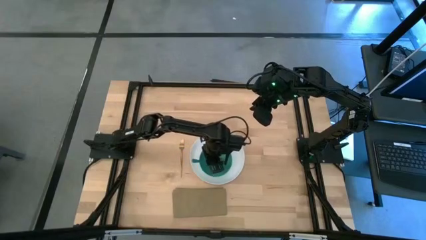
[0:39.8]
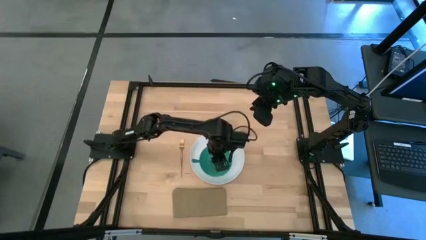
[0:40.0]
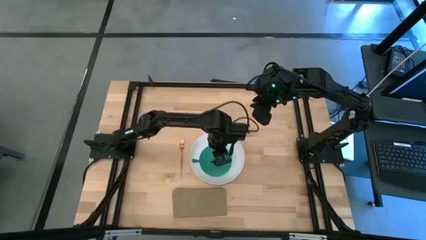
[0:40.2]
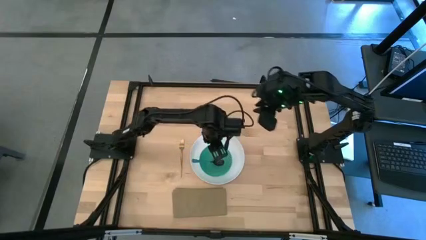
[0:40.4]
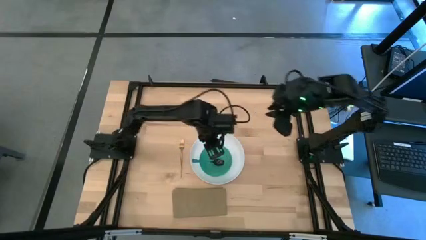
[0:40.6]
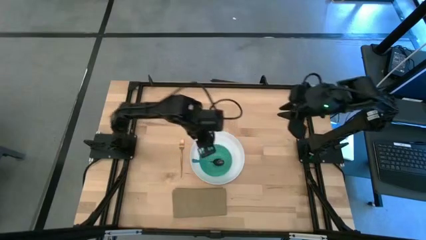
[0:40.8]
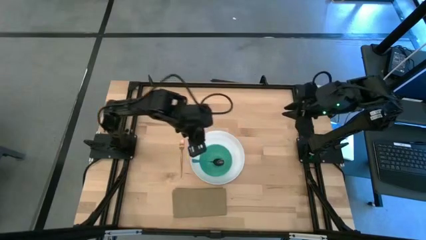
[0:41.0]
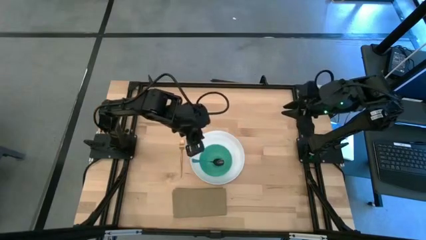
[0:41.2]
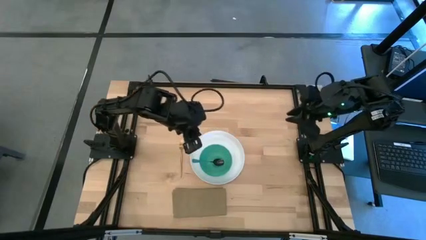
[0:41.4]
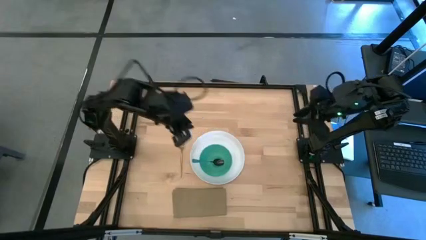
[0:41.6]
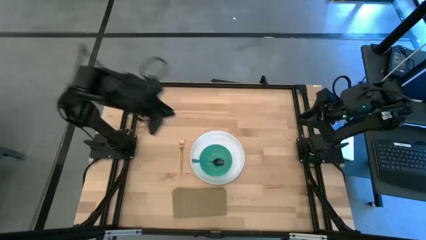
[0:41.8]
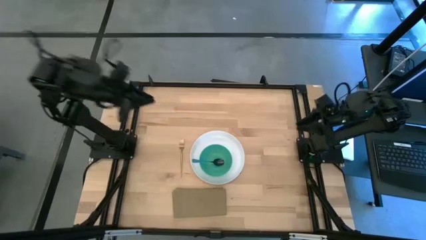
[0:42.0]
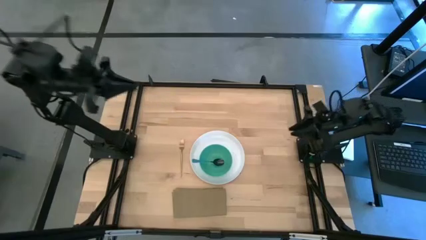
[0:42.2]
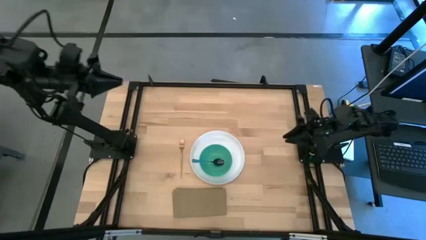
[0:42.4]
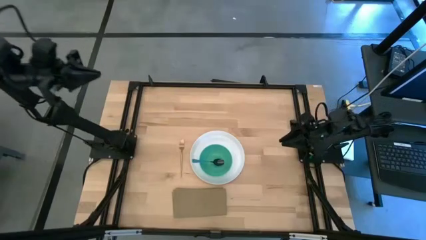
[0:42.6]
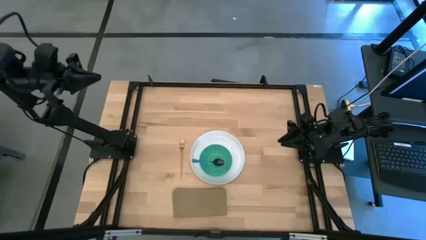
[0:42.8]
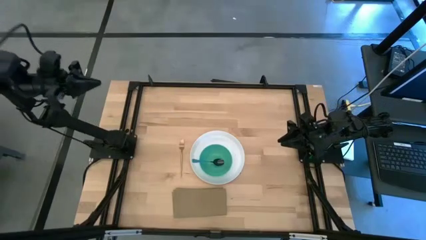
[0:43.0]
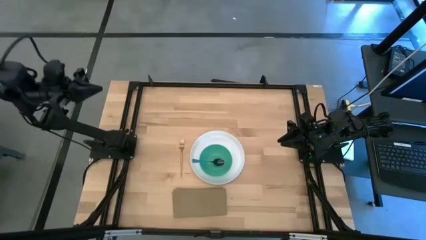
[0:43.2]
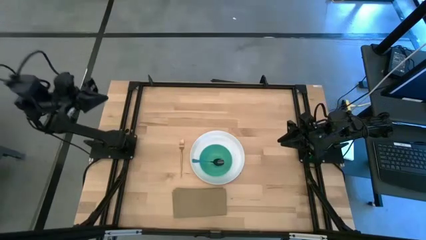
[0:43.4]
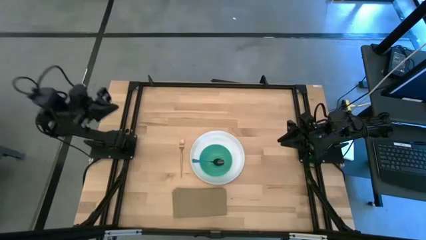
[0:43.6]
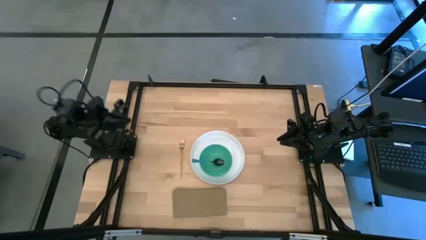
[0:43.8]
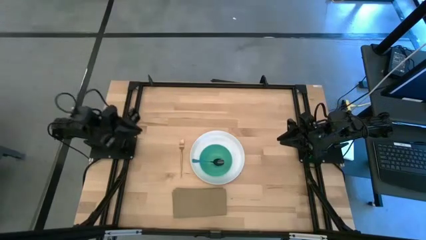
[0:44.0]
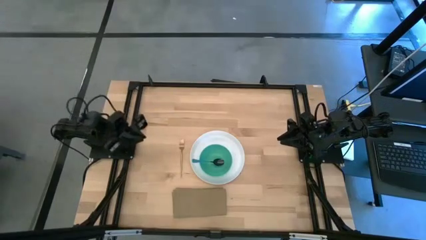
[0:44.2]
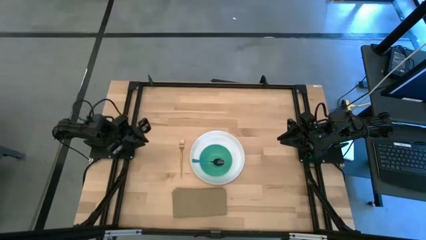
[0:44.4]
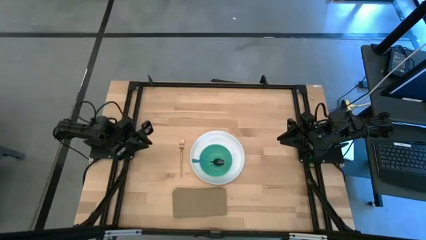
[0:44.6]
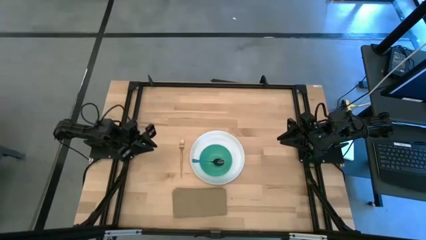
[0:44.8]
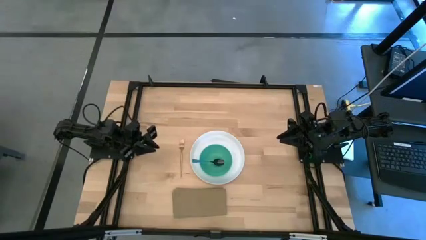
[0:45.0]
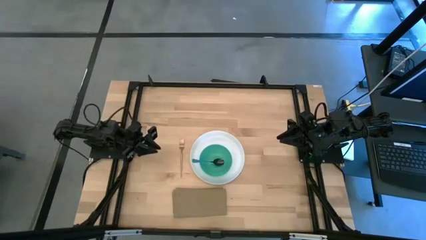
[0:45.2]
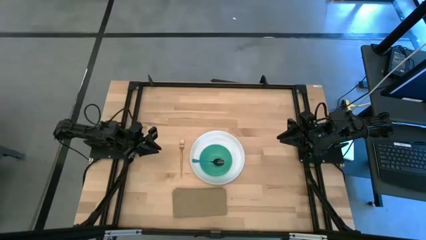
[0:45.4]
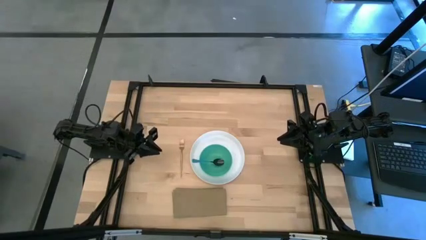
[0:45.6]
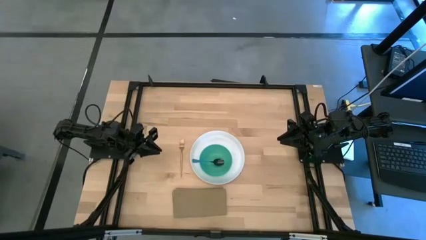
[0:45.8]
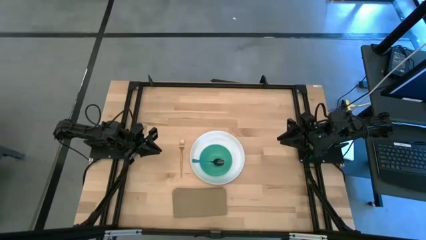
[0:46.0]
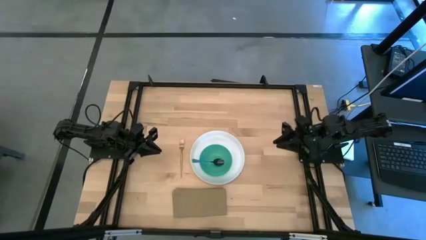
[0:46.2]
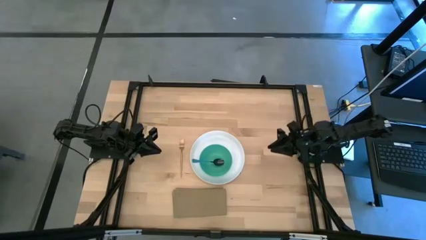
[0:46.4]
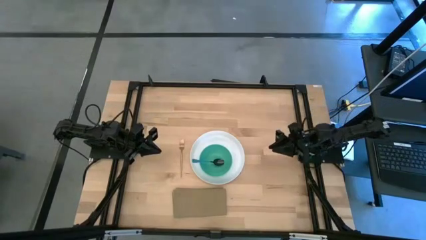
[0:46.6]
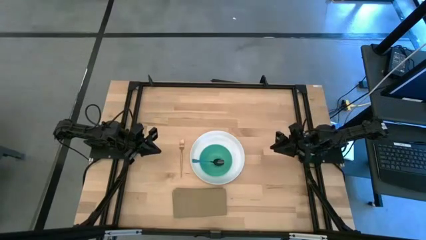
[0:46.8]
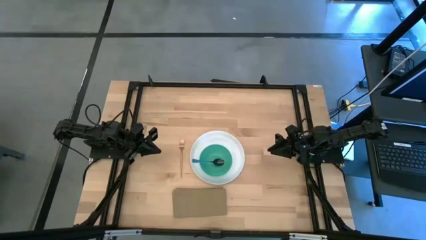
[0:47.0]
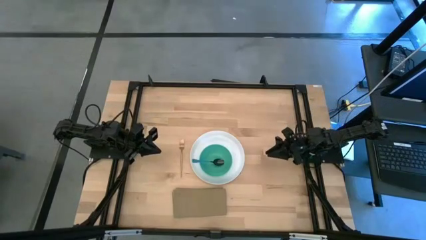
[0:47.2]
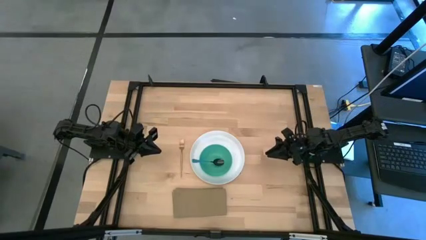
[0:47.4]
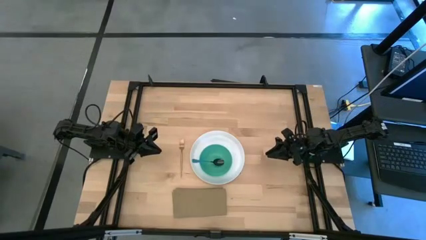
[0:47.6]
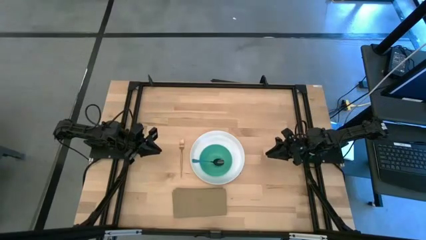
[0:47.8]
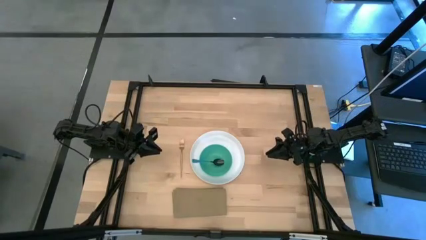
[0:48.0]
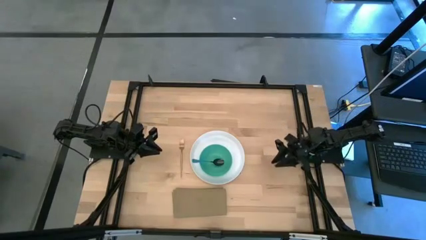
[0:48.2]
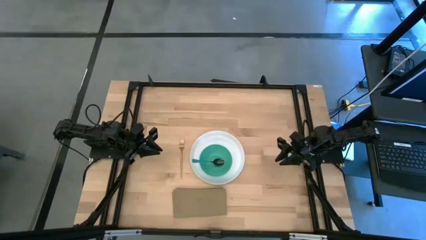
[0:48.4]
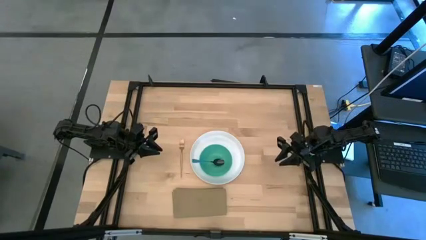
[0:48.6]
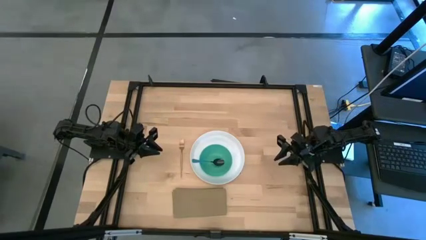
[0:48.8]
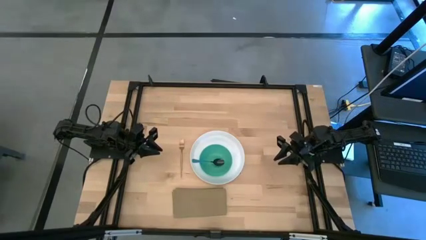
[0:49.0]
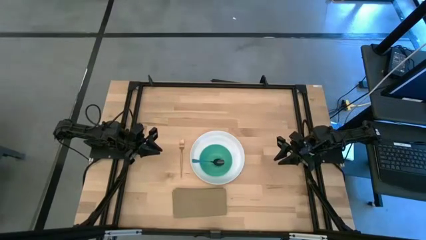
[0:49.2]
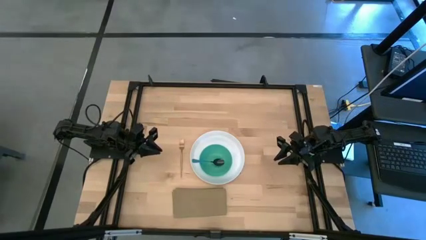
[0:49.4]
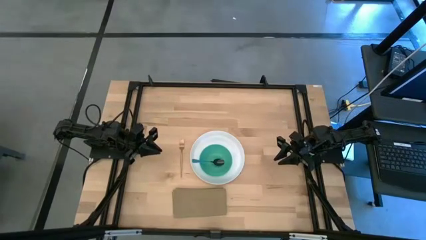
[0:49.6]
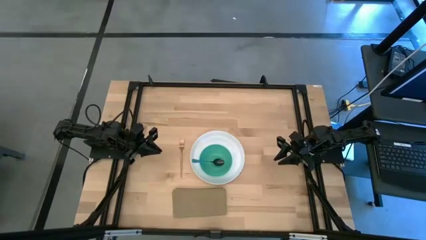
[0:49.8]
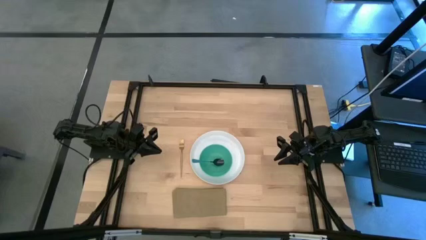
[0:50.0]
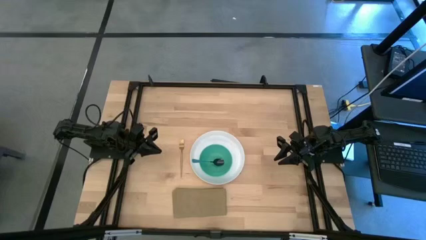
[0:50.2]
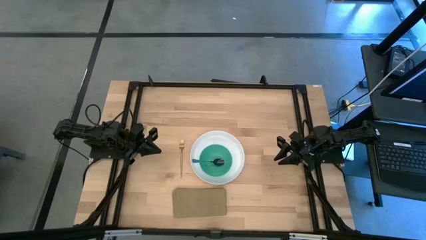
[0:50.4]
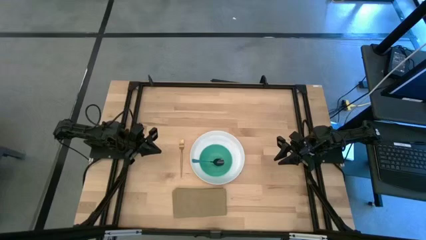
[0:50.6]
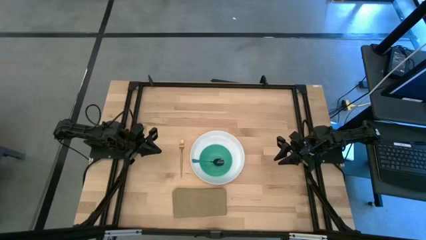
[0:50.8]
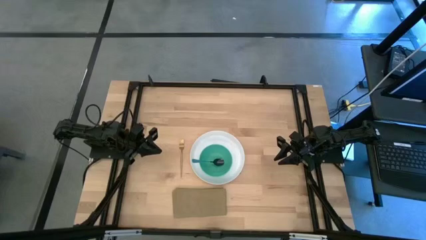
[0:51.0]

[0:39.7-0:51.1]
Task: Set table place
Return to Home Position
